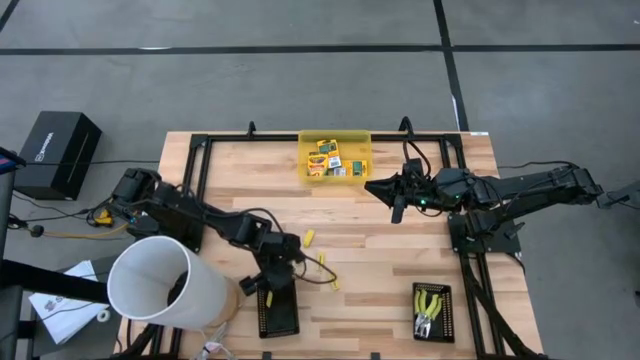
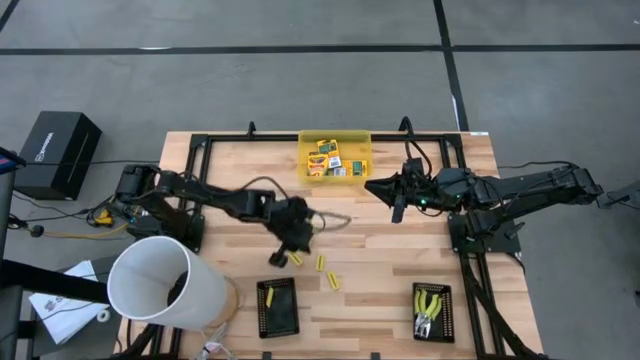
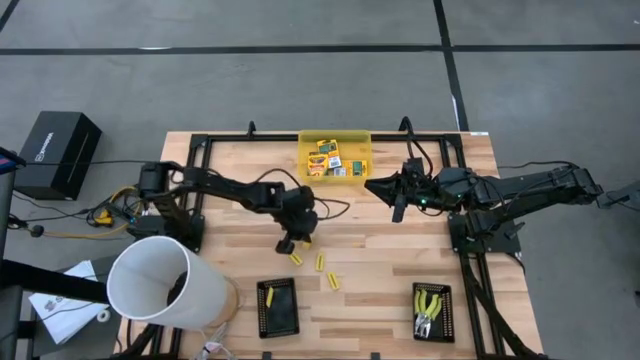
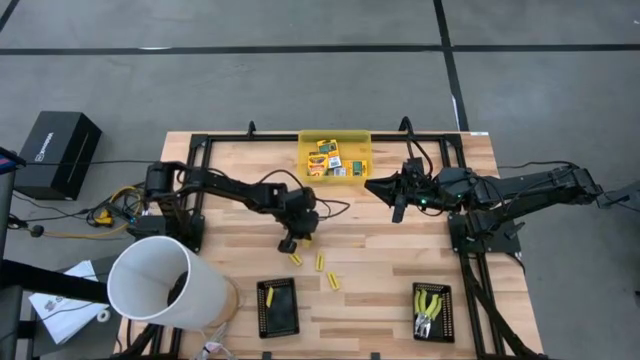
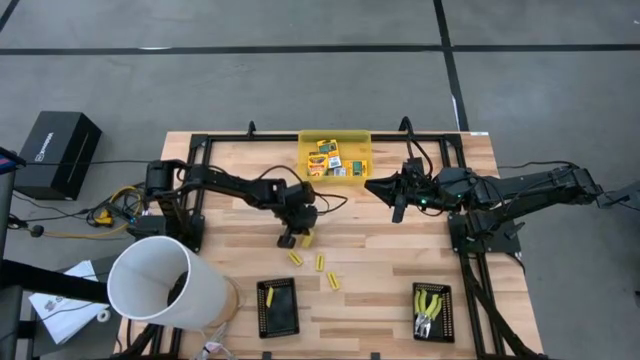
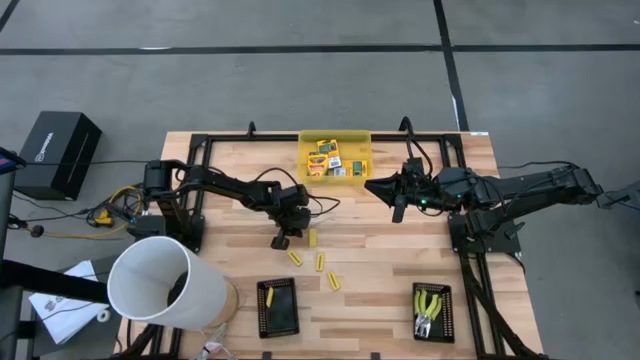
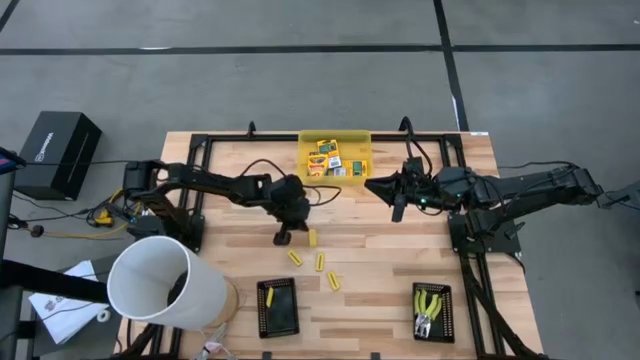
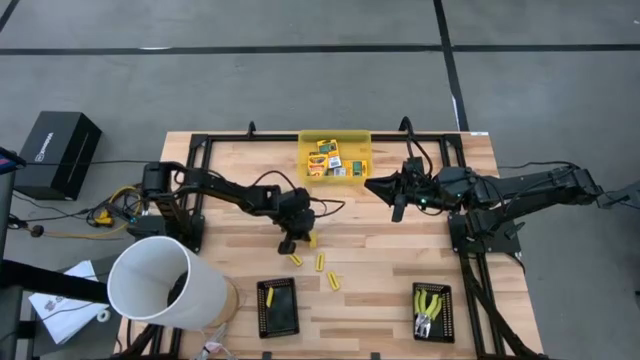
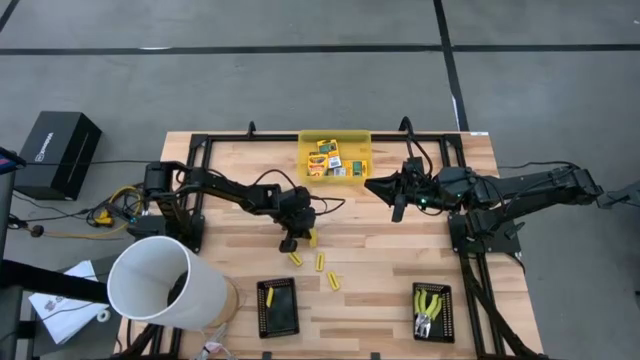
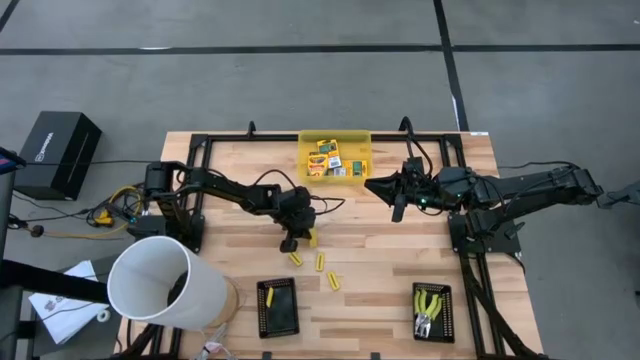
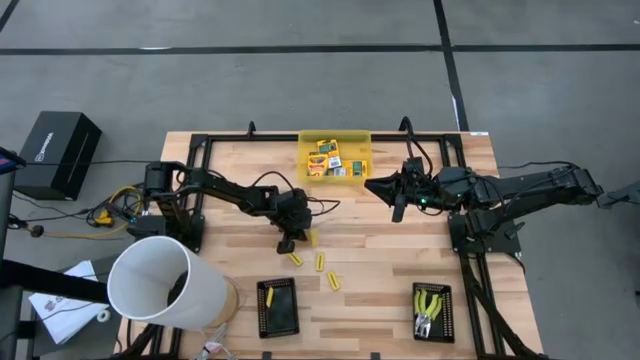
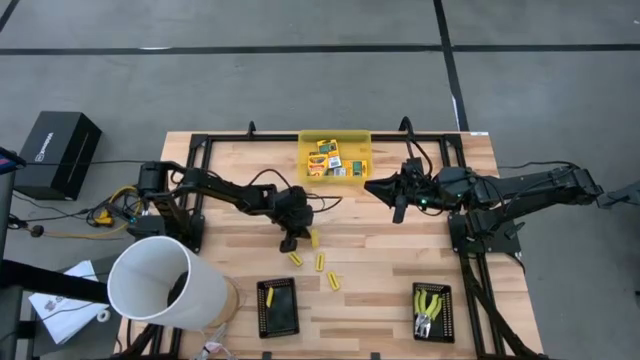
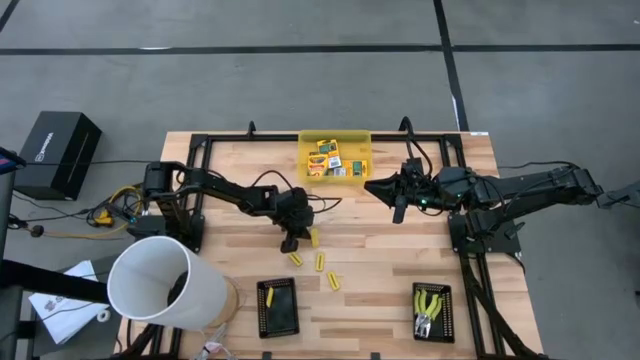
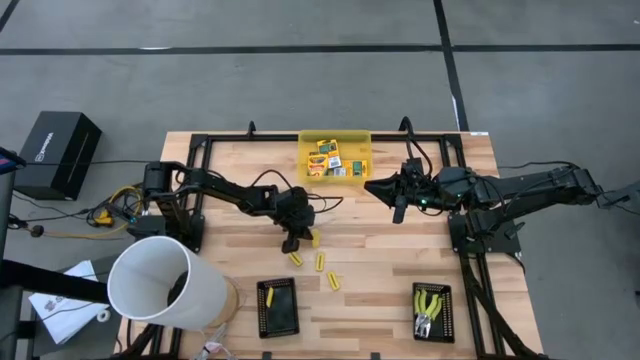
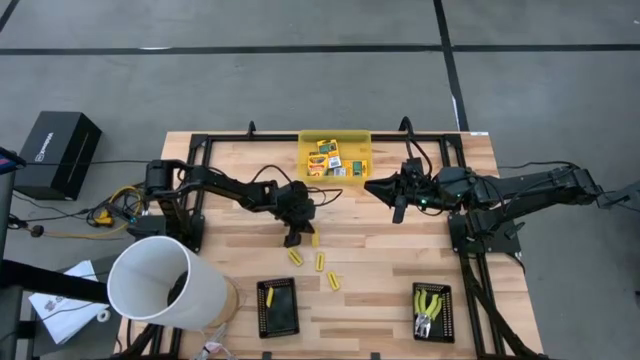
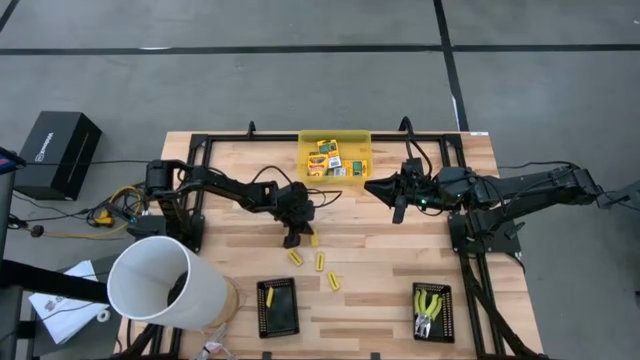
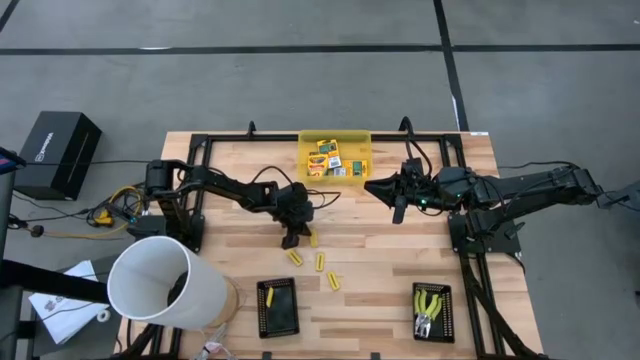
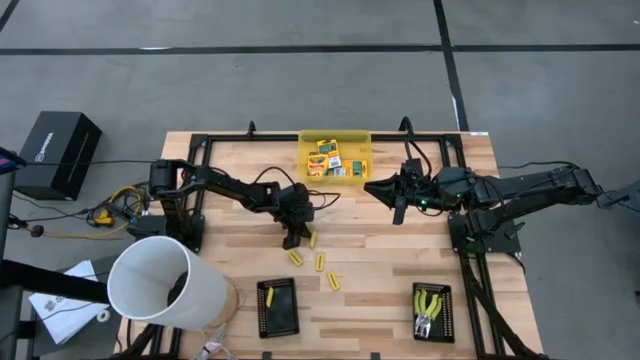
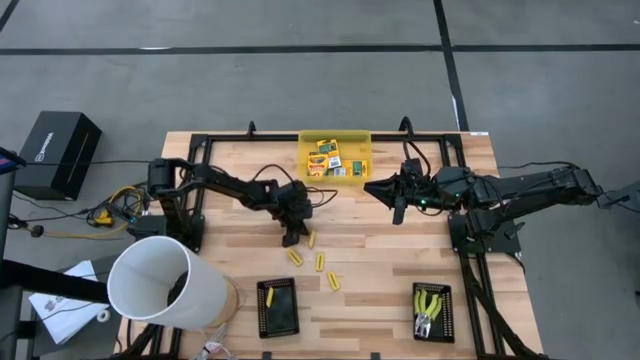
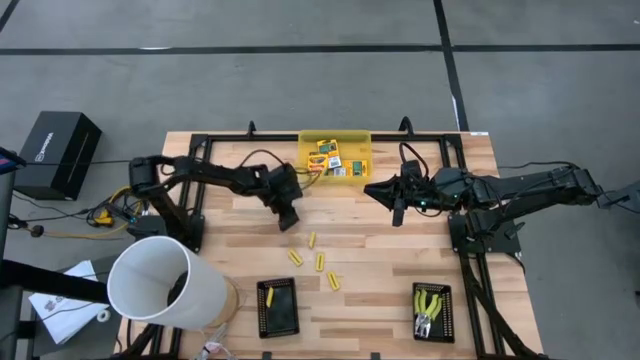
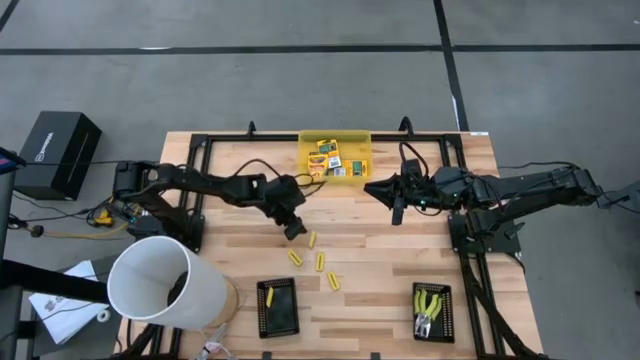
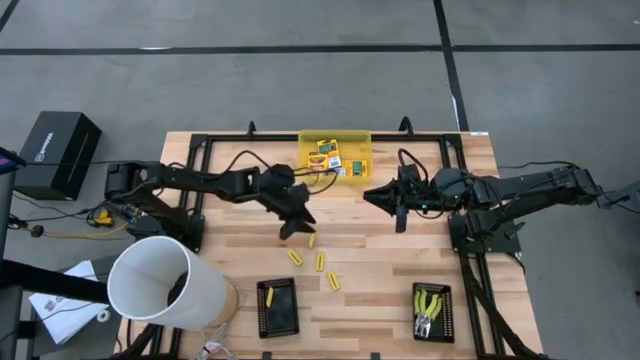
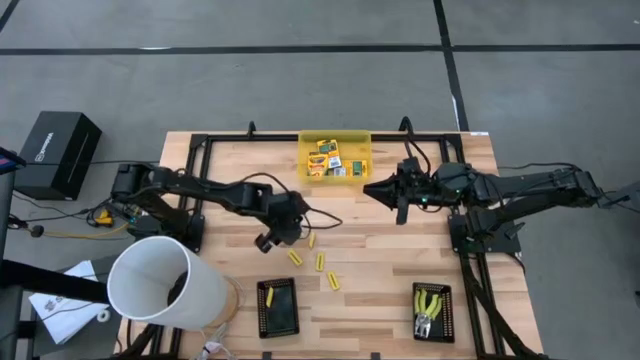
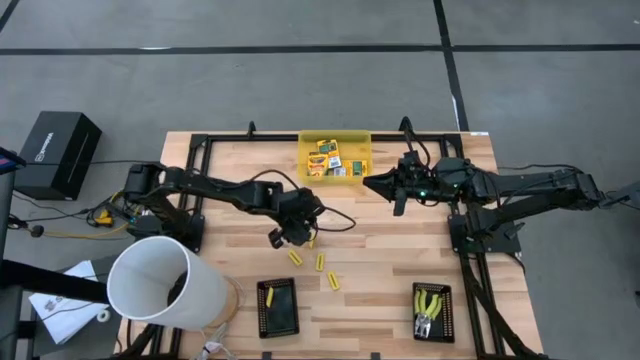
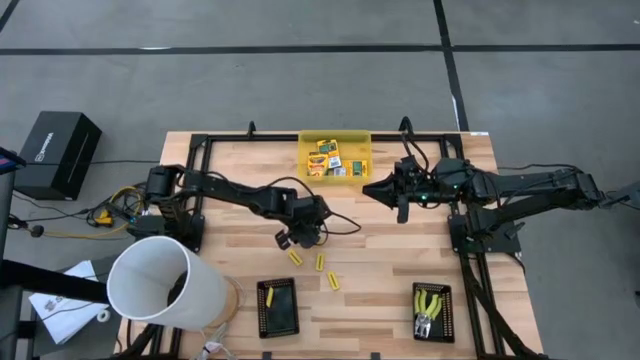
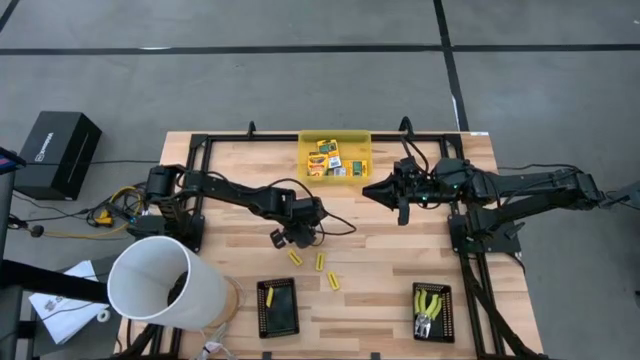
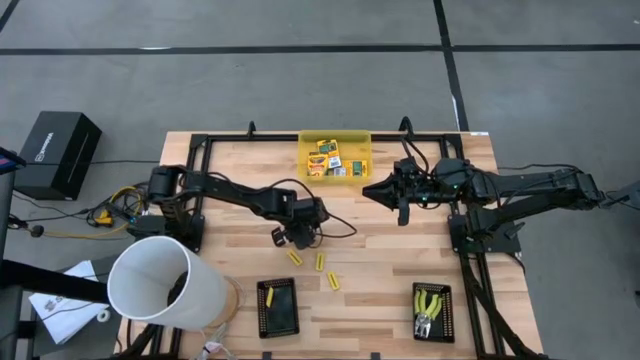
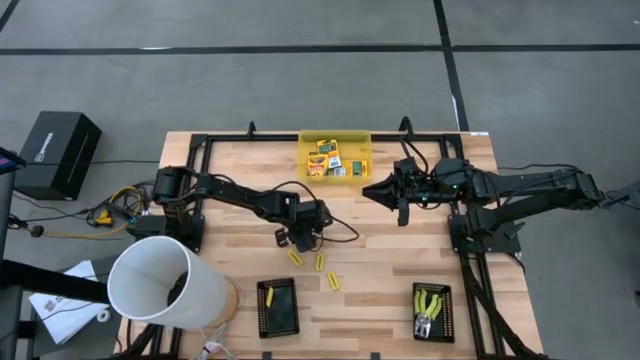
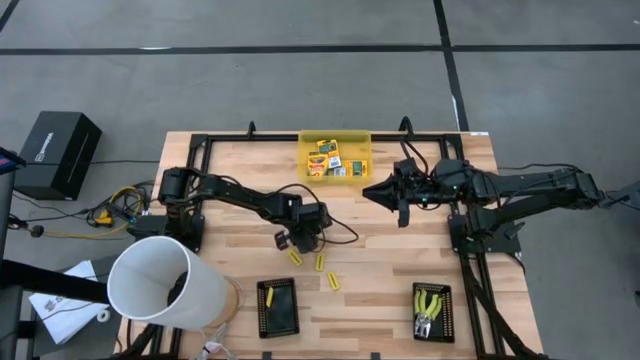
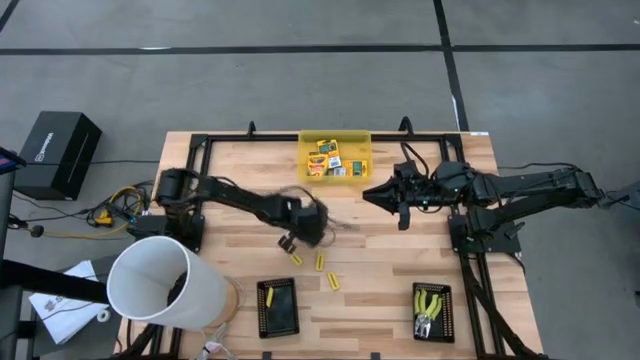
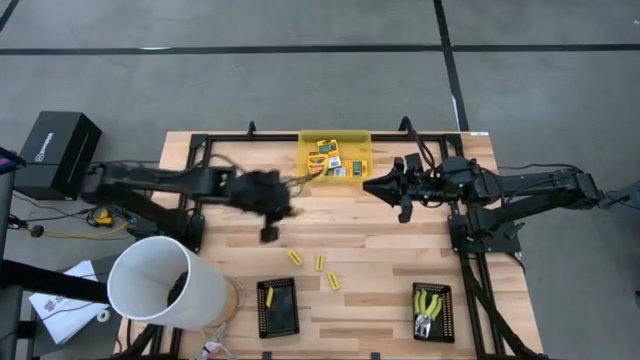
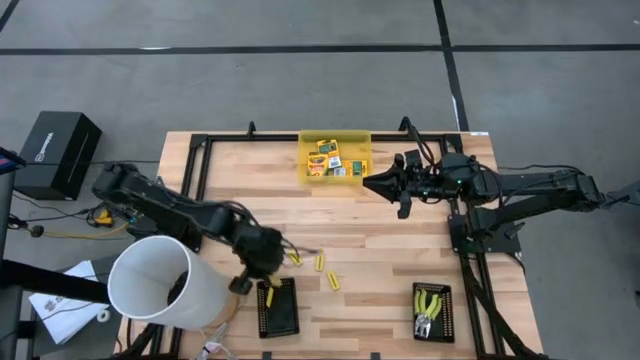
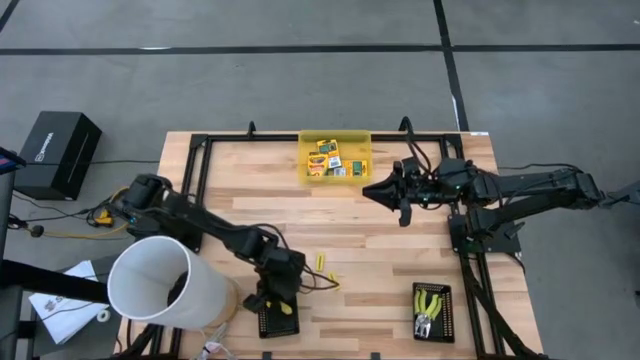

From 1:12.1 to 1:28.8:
Task: Pick & Place School Supplies
Put the yellow eraser into the left black bin

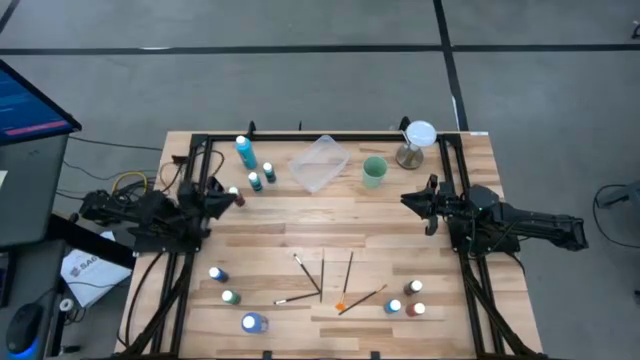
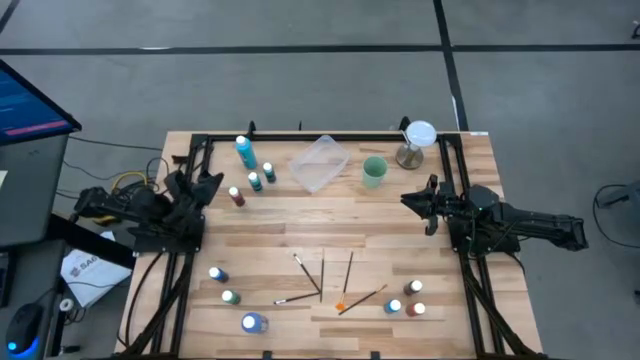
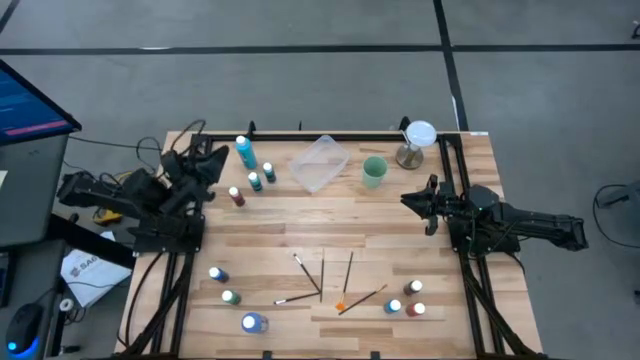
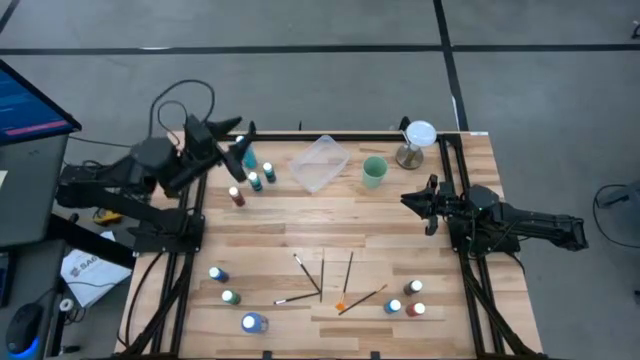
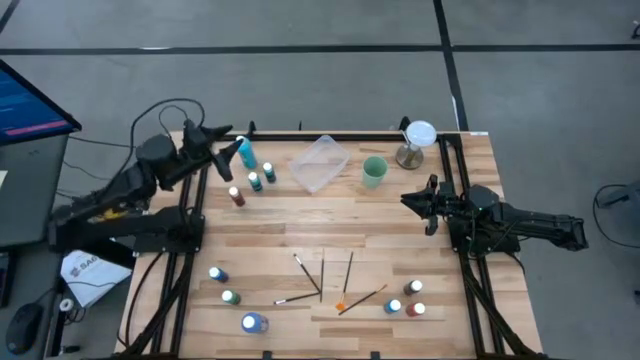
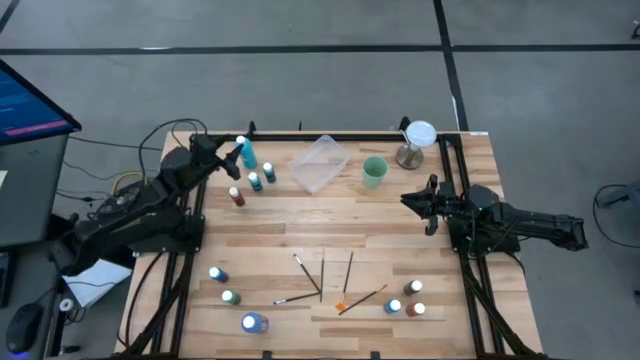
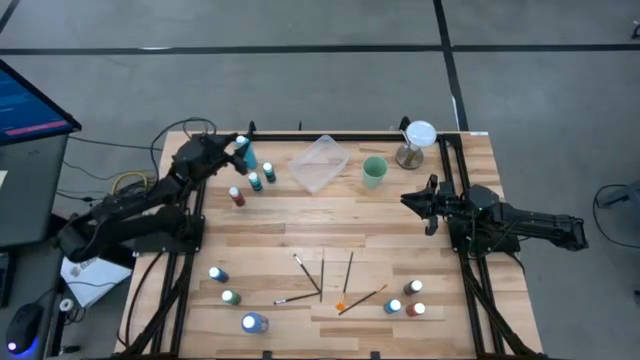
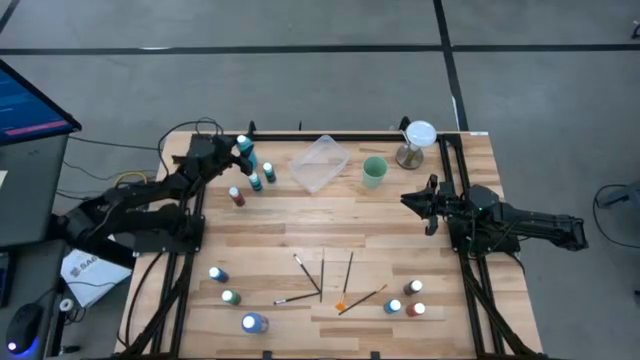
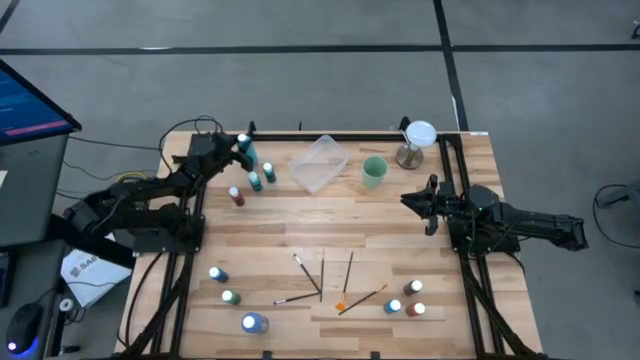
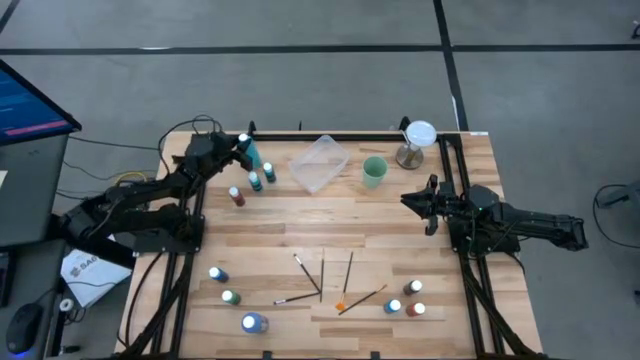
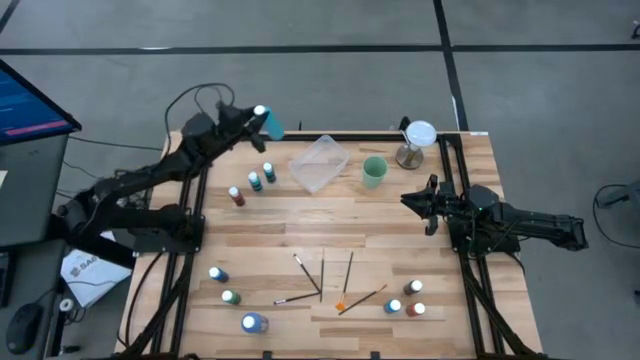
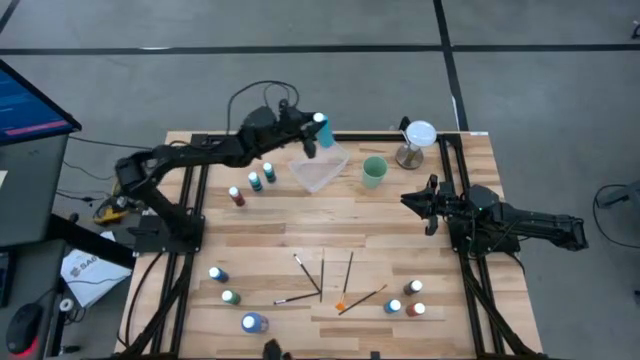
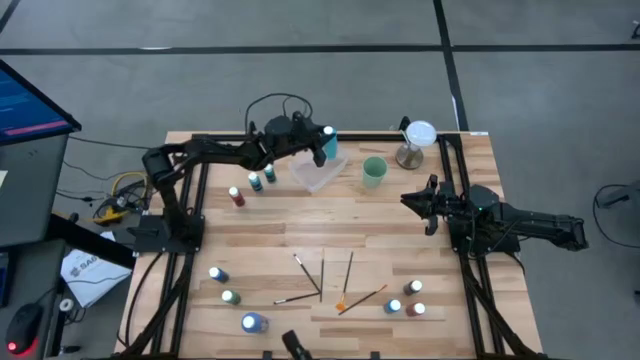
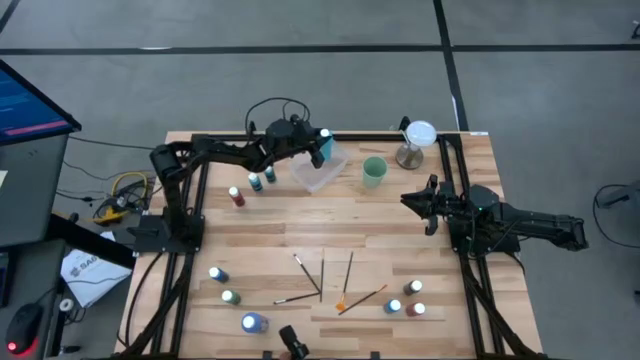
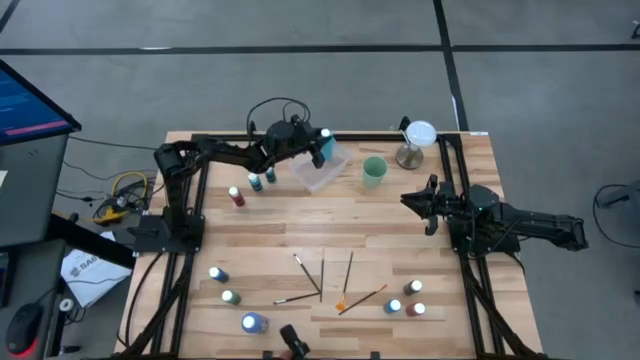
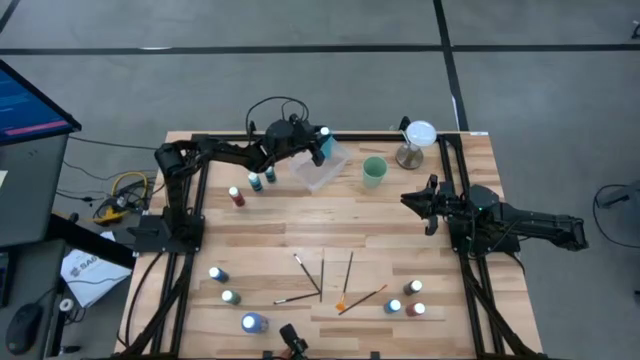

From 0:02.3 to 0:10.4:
Task: Pick & Place Paint Supplies
Put the large light blue paint bottle into the transparent bin
